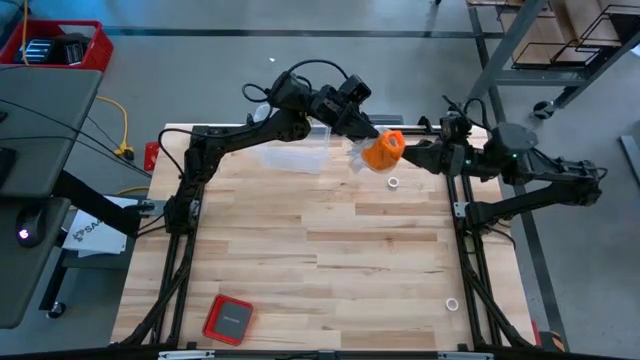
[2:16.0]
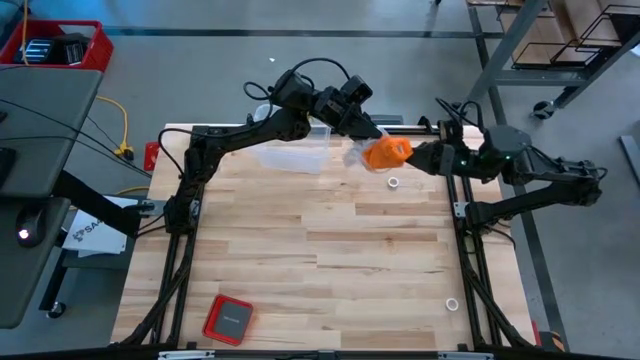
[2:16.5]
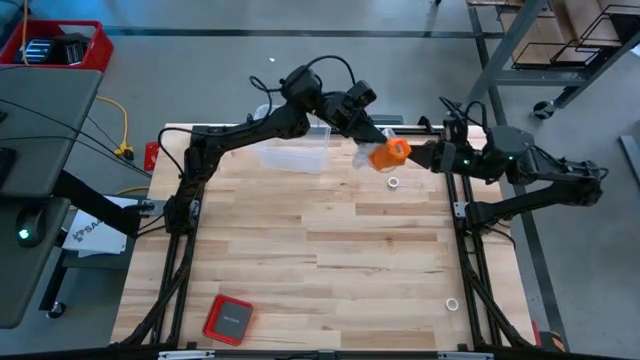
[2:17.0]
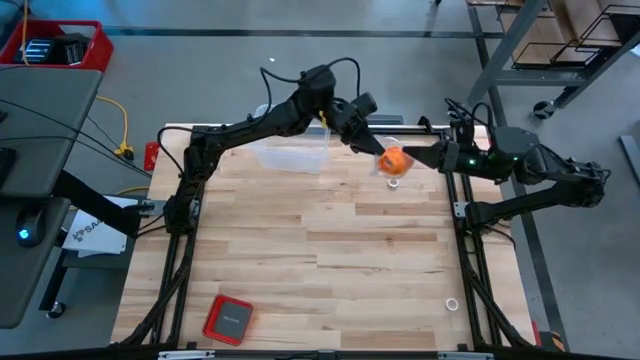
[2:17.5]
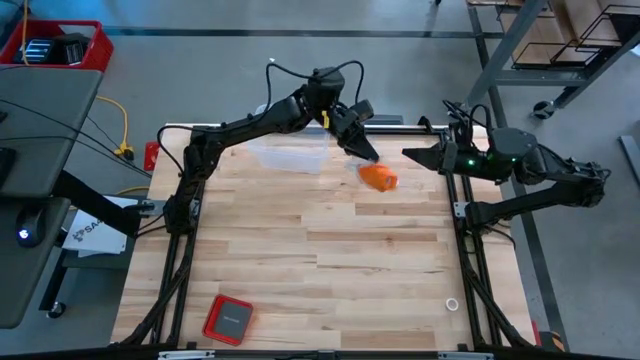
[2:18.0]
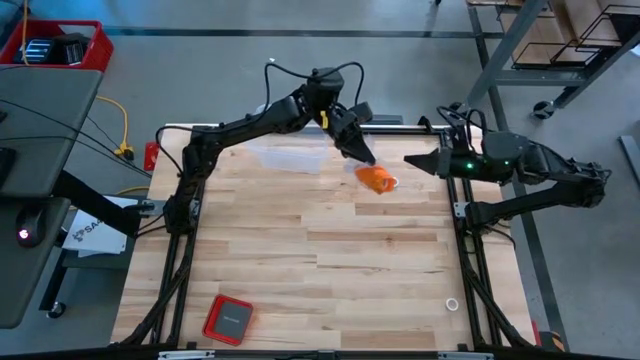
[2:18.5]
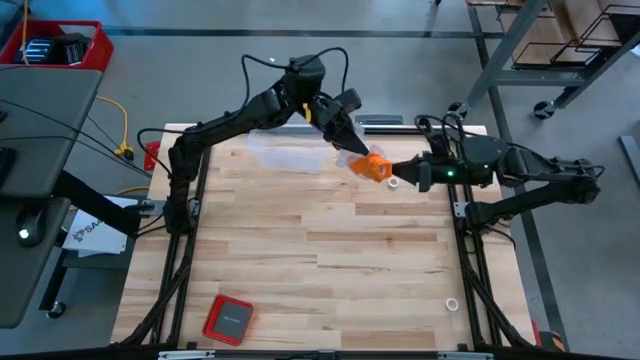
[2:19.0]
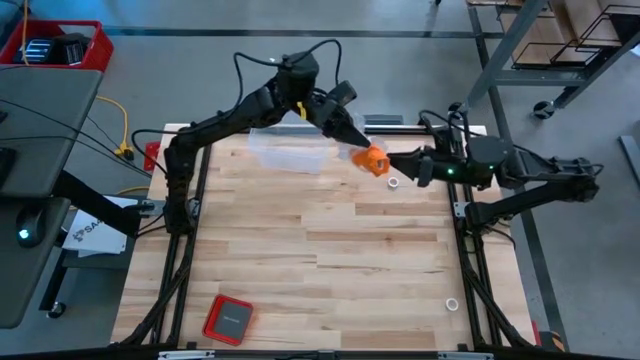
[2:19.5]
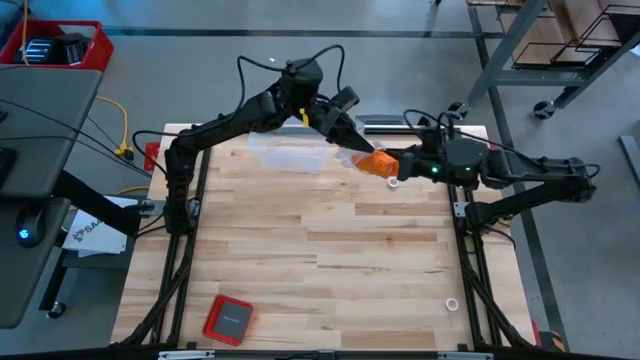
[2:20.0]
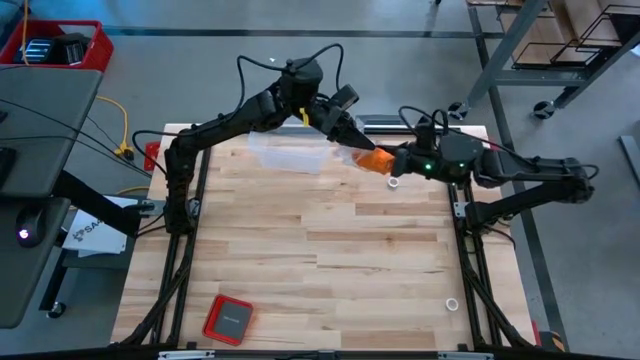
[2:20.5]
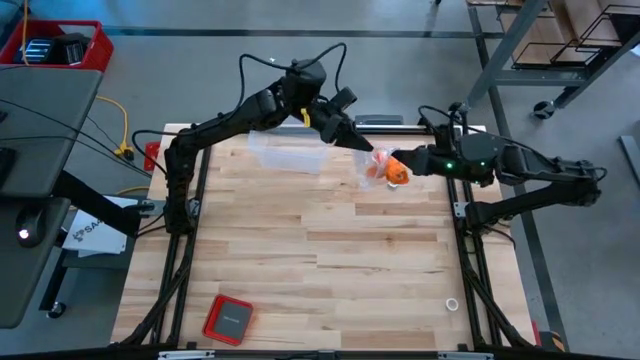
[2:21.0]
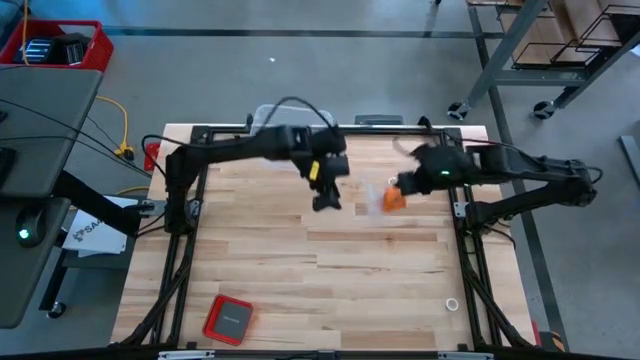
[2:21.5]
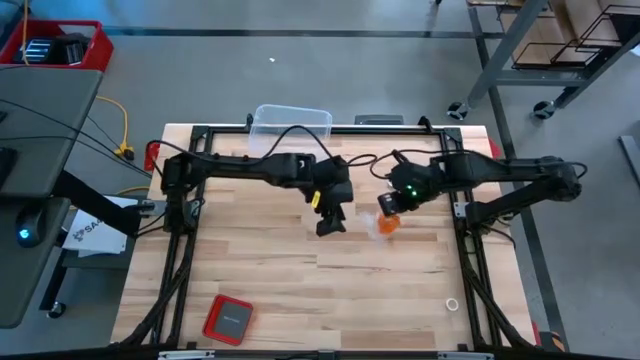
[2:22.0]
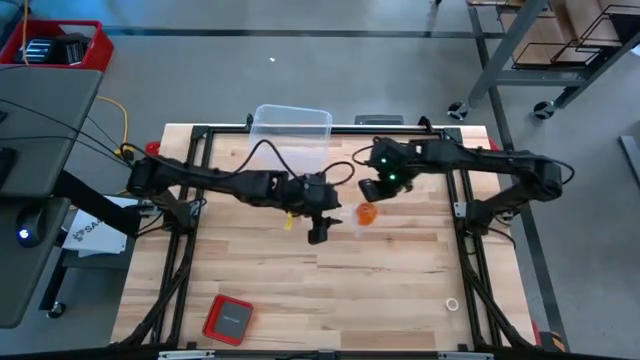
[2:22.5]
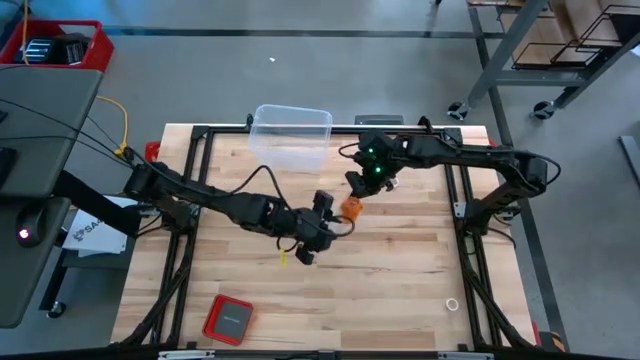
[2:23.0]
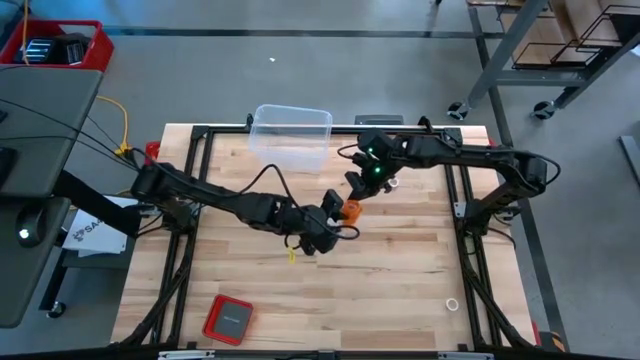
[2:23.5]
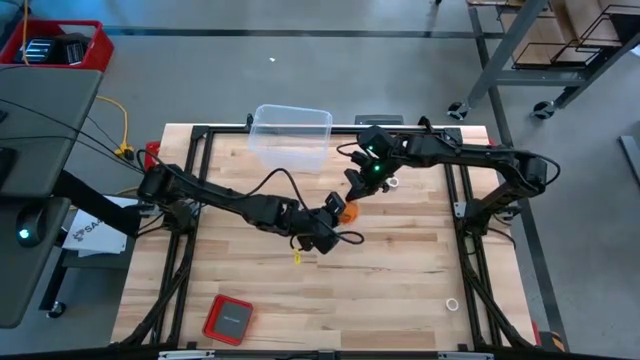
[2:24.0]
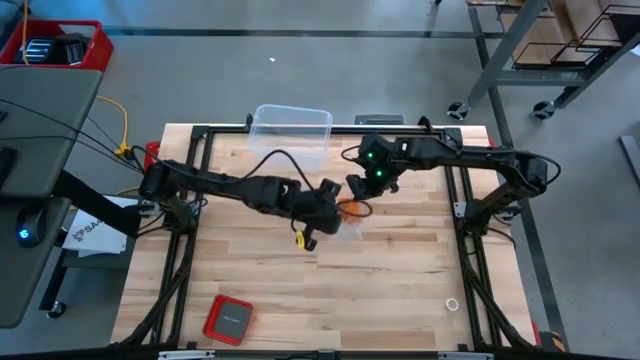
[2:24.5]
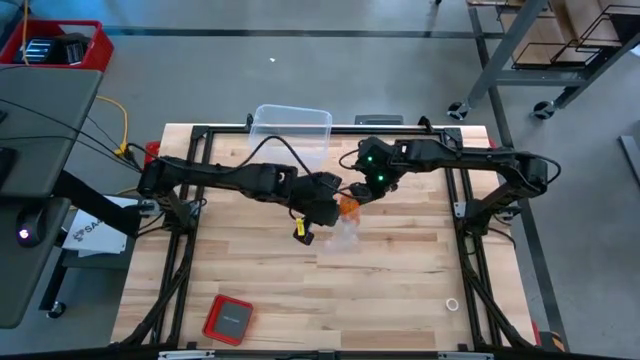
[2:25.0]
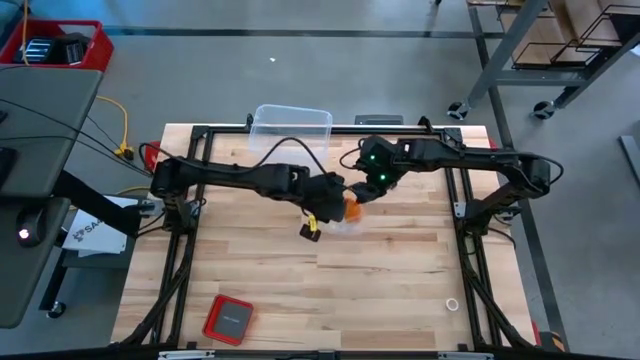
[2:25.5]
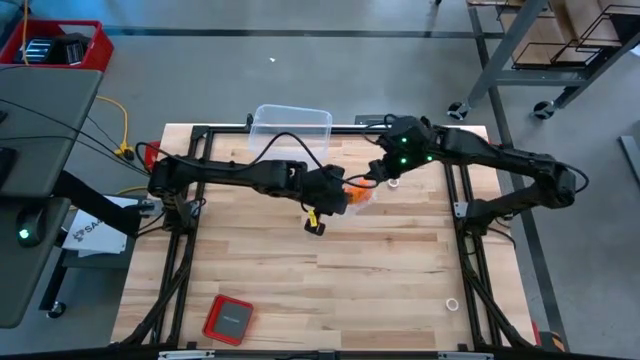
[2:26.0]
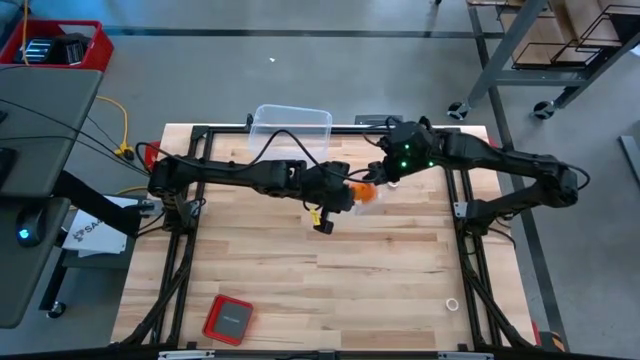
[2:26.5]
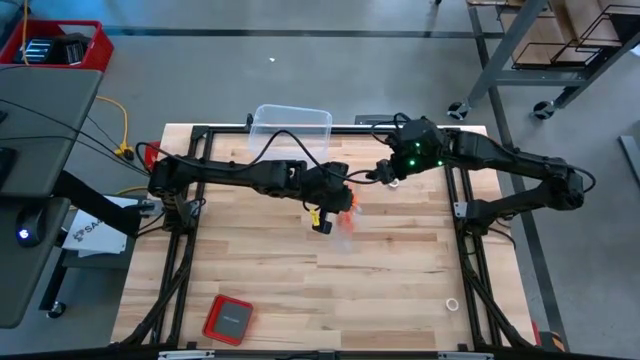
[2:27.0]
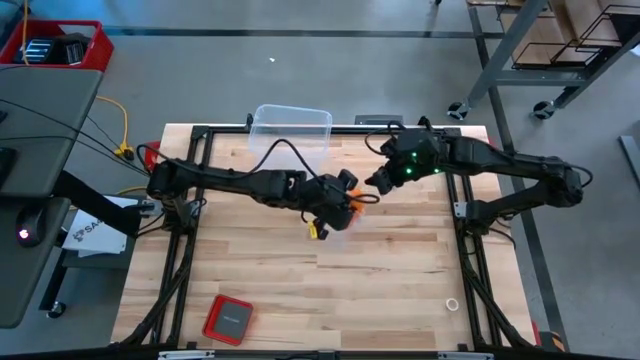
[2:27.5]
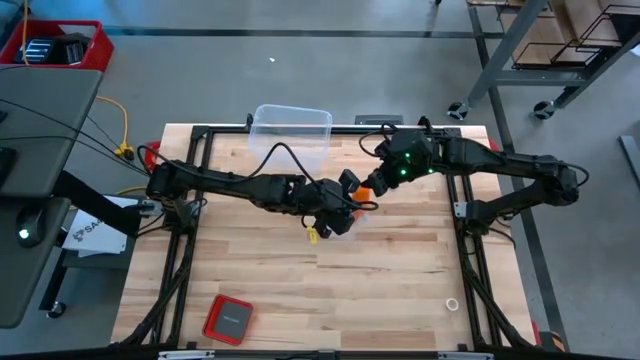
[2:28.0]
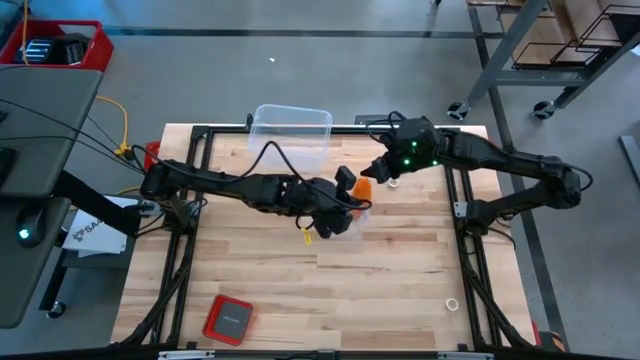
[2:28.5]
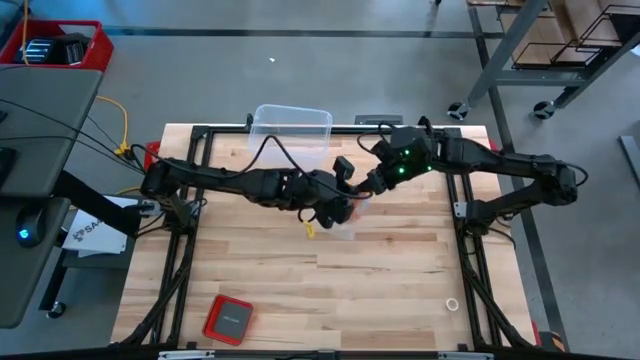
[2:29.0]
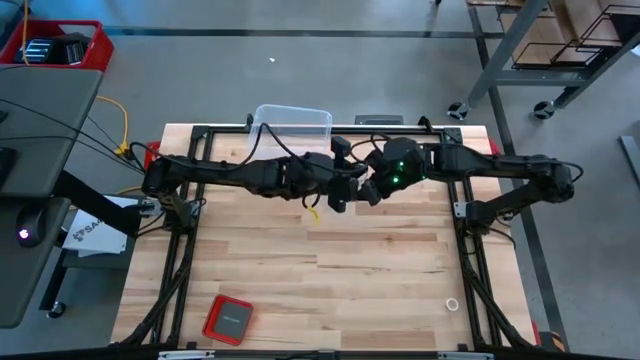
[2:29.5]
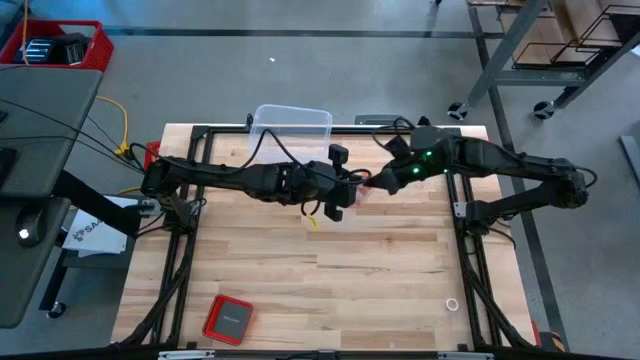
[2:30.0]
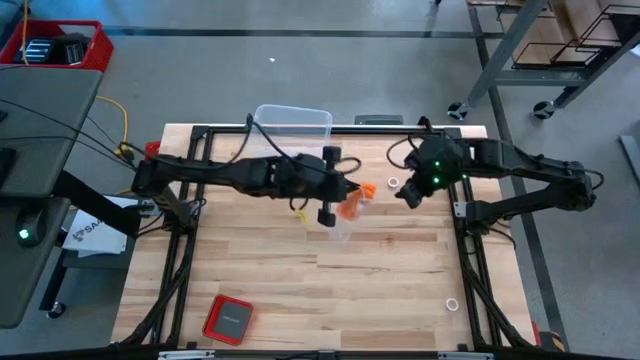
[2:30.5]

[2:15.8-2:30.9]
Task: Roll bandage
Put the orange bandage in the transparent zip bag

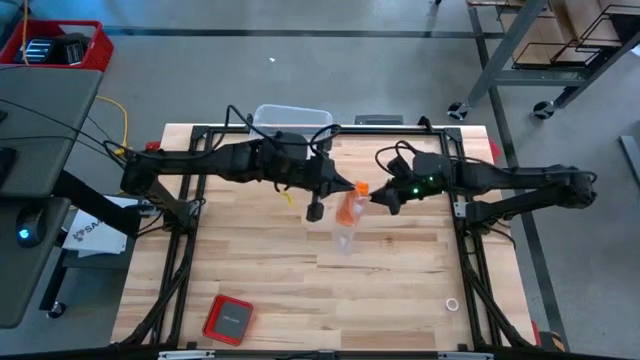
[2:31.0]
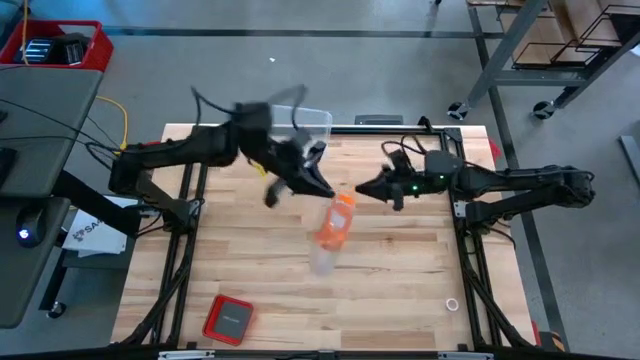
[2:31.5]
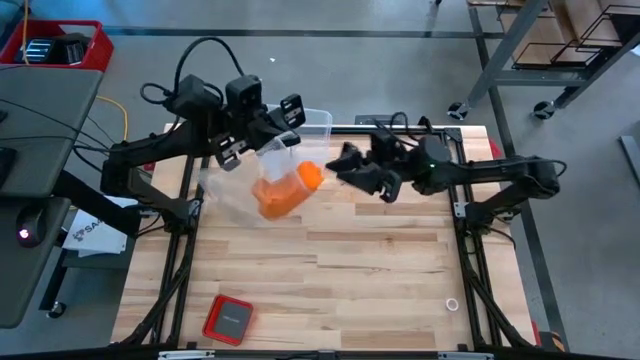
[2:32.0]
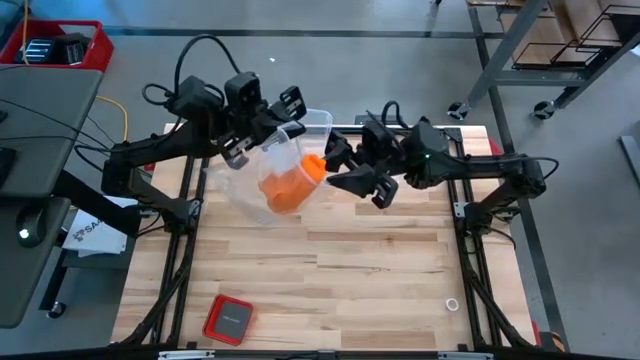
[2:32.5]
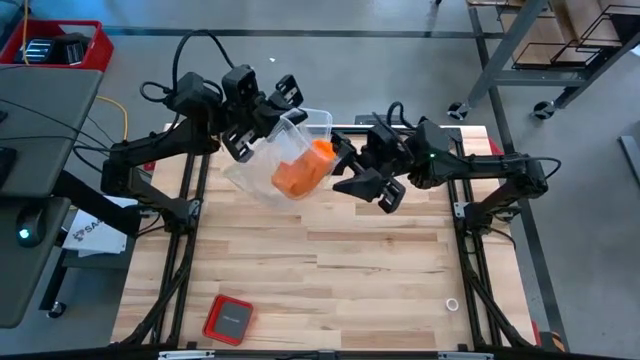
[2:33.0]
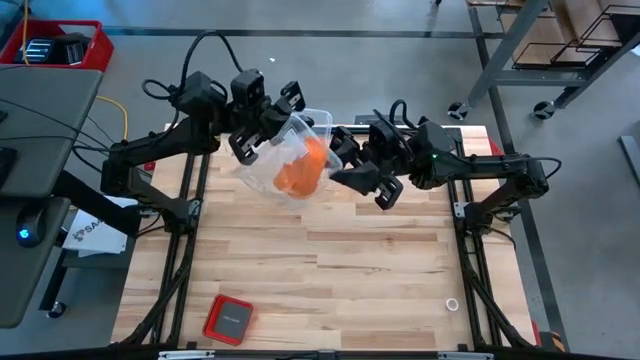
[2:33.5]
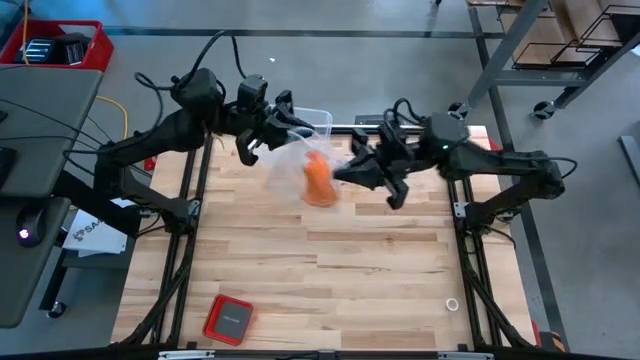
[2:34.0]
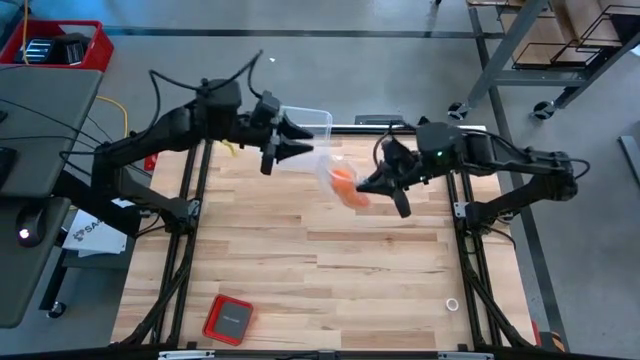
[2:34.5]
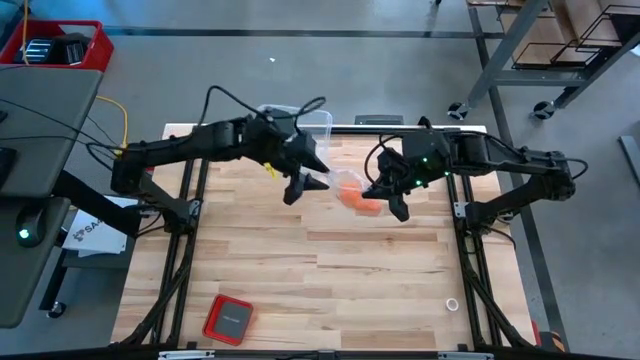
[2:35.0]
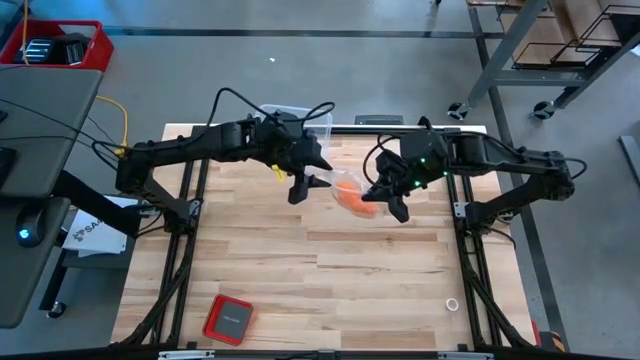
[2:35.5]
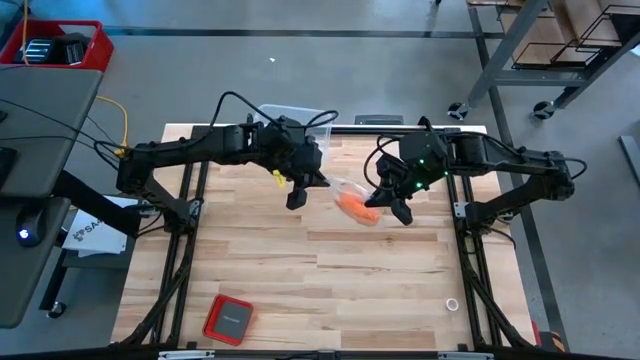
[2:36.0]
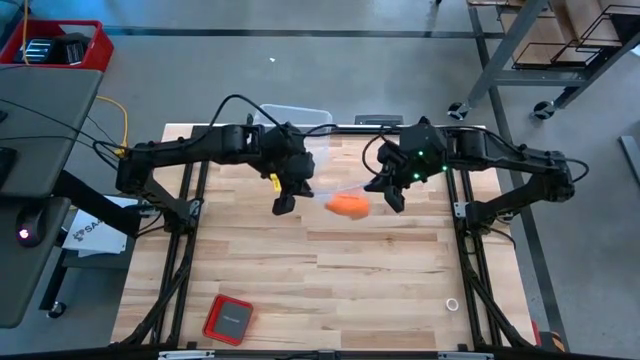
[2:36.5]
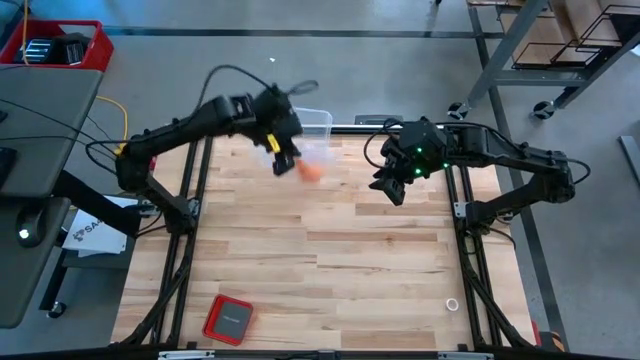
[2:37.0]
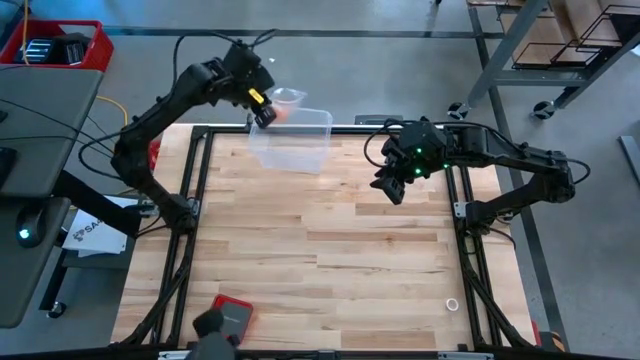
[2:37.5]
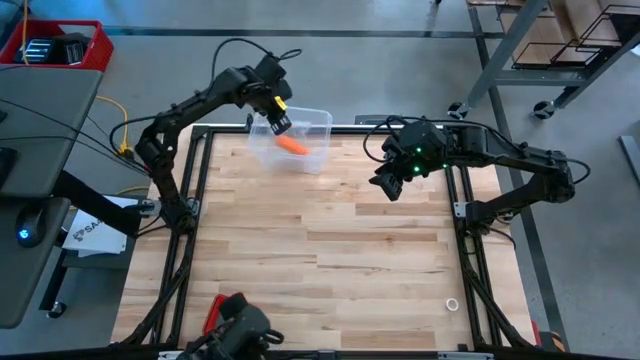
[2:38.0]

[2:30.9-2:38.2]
Put the transparent zip bag containing the rolled orange bandage into the transparent bin
